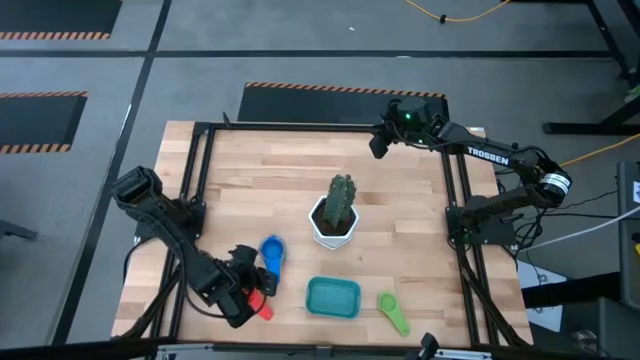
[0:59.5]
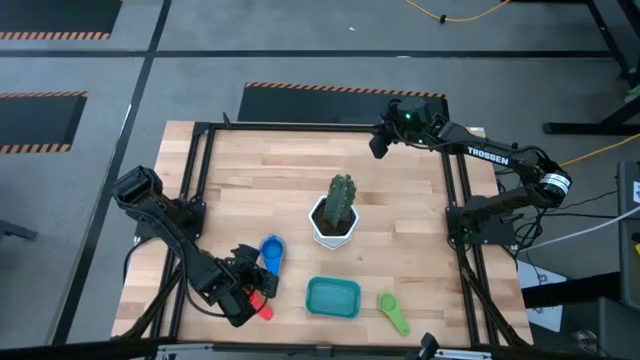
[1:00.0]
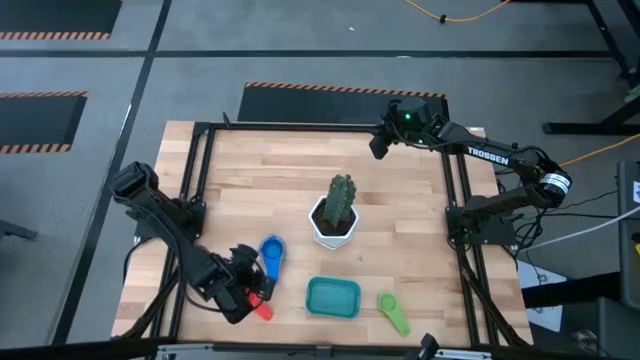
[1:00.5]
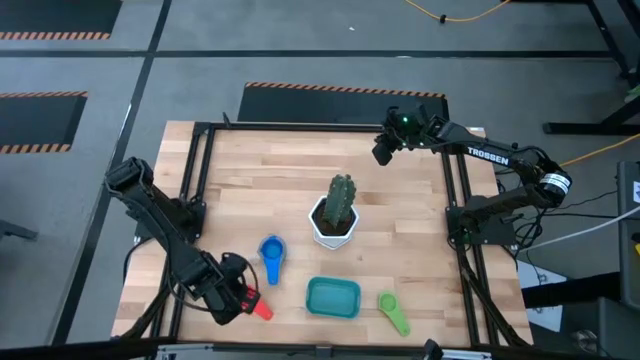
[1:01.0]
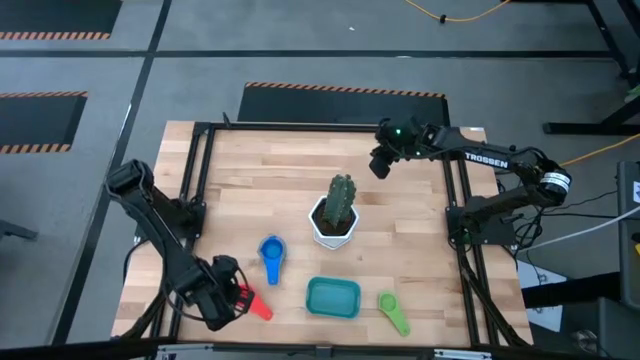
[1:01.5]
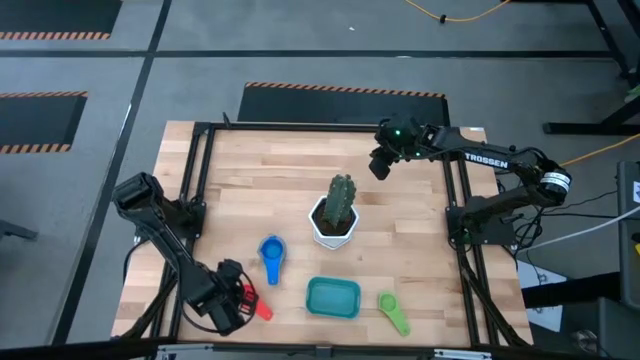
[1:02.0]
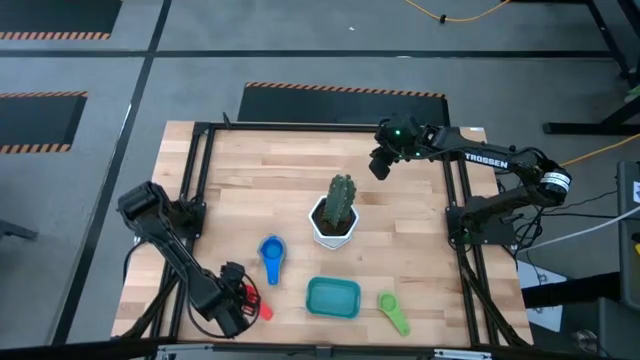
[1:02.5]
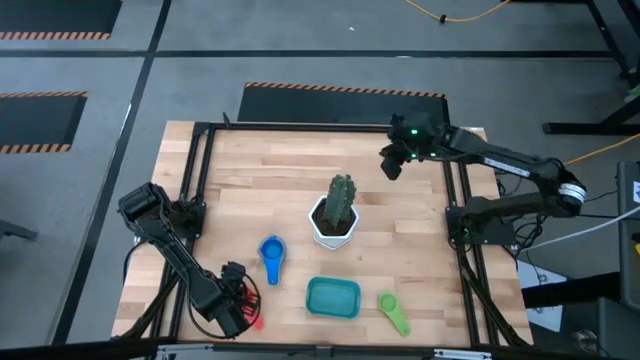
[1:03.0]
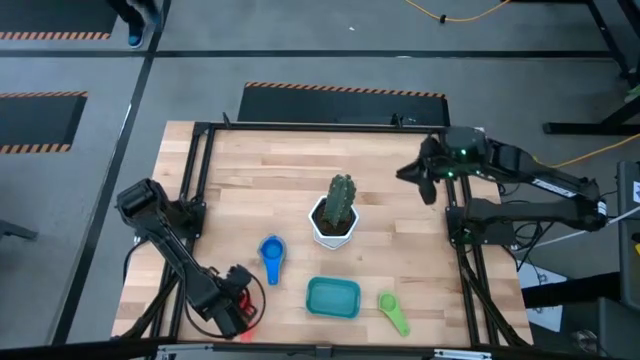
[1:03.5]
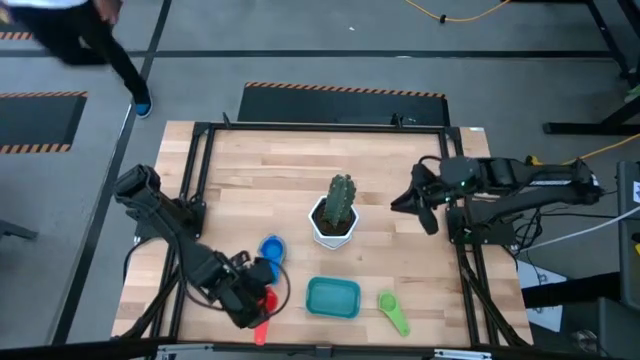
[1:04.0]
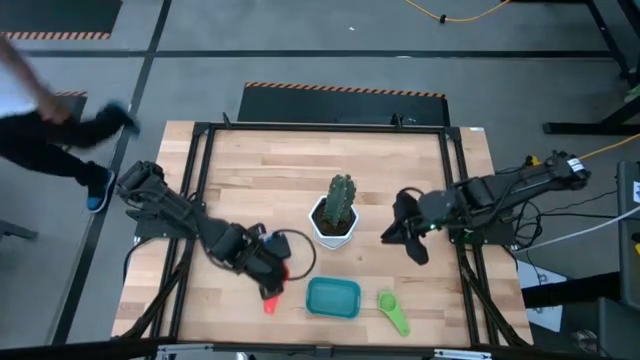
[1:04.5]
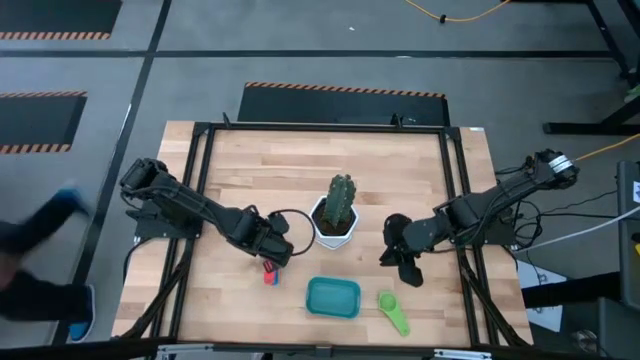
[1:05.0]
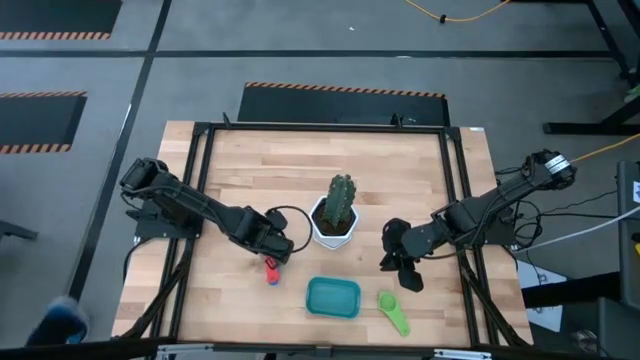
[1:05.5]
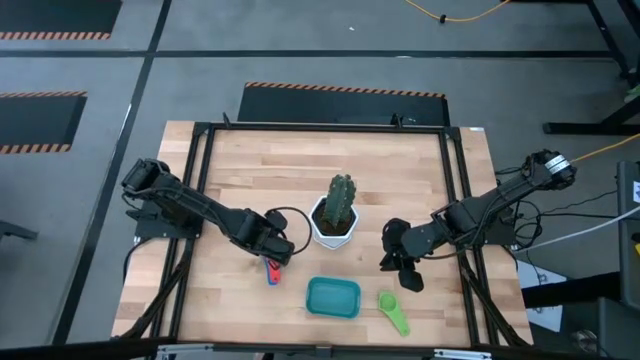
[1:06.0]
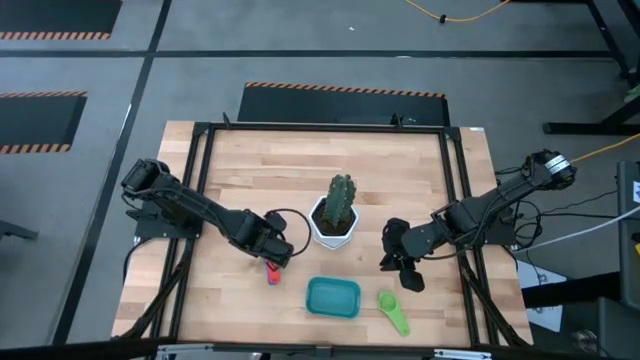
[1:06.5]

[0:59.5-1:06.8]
Task: Nest measuring cups in basket
Stack the red measuring cup on top of the blue measuring cup

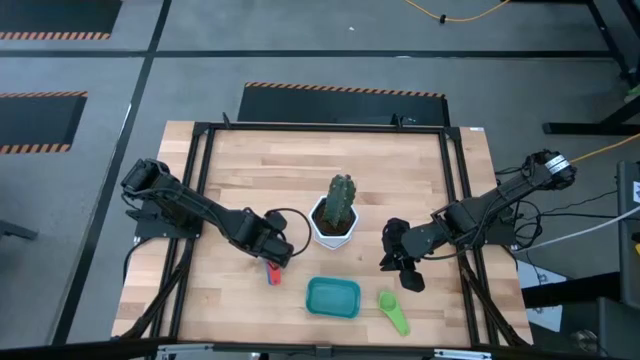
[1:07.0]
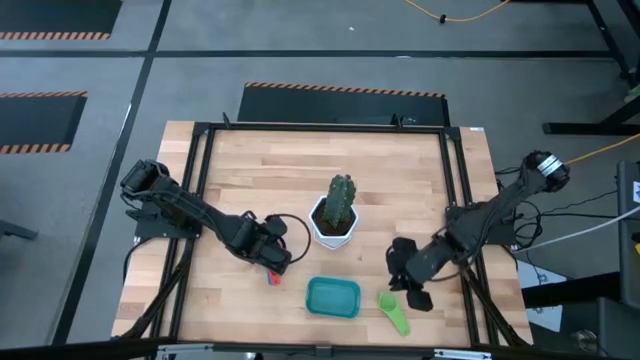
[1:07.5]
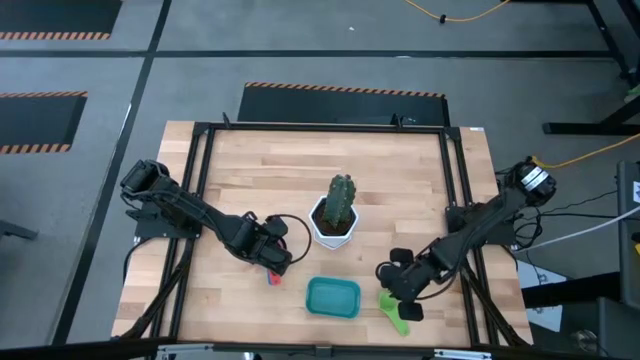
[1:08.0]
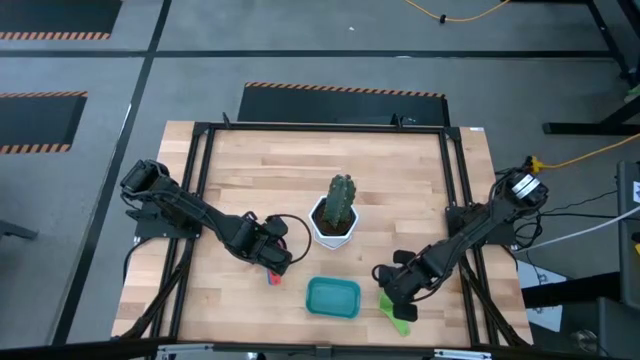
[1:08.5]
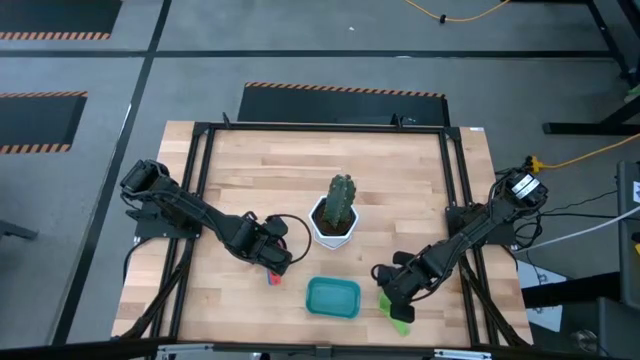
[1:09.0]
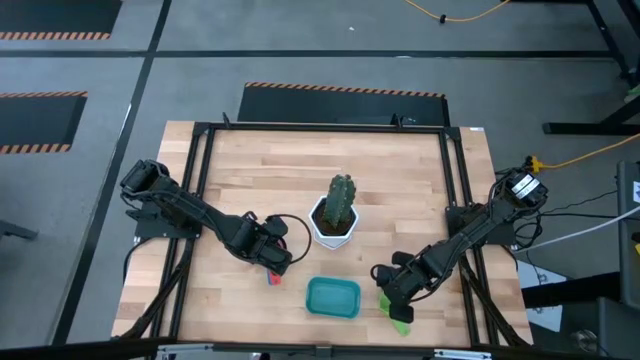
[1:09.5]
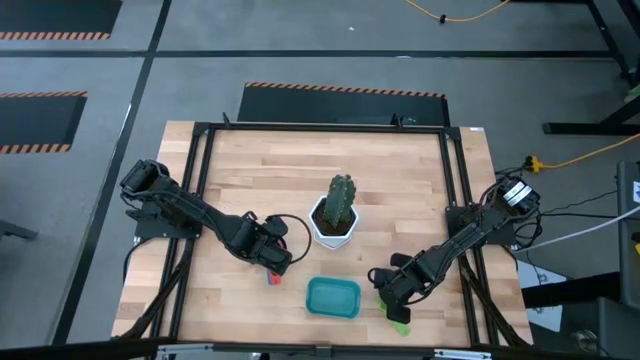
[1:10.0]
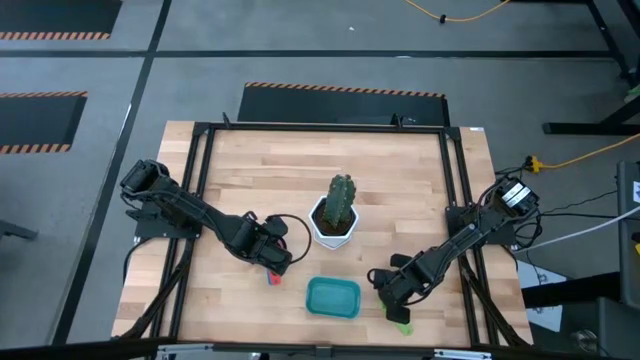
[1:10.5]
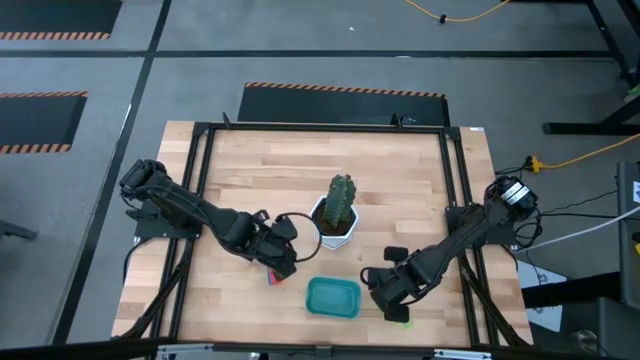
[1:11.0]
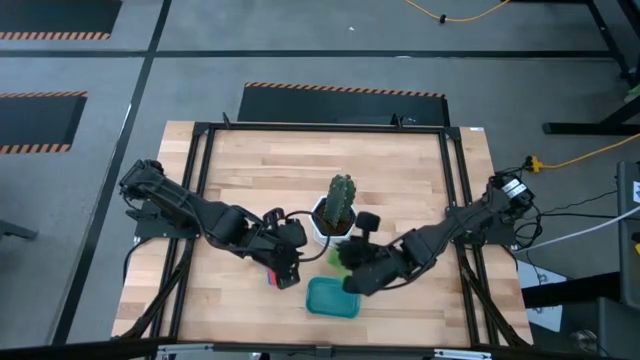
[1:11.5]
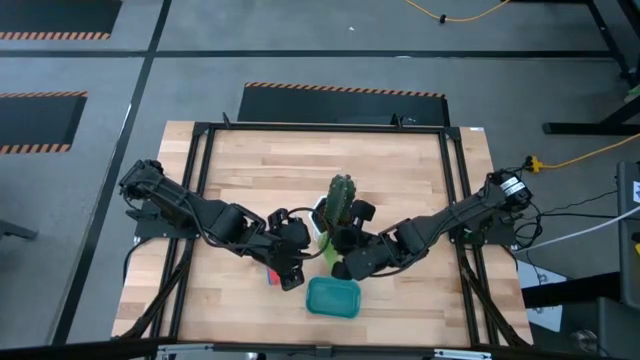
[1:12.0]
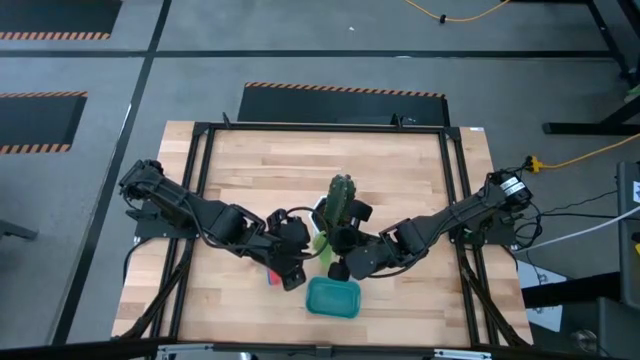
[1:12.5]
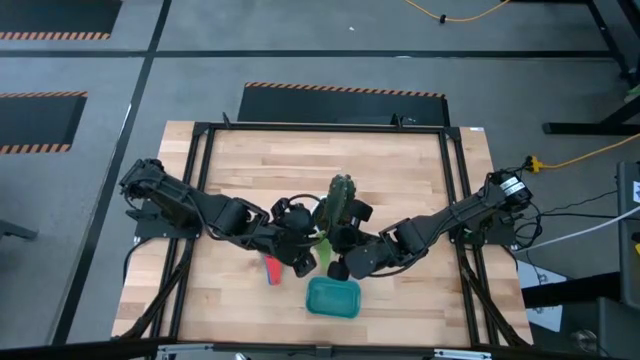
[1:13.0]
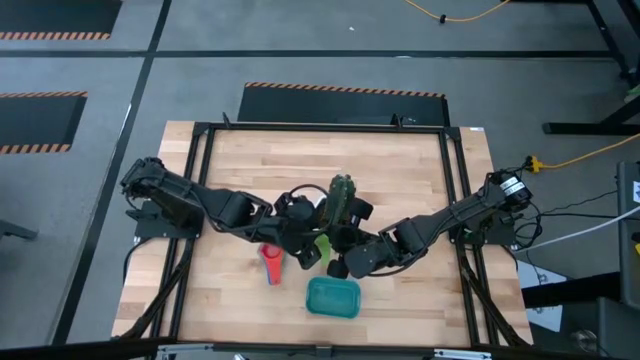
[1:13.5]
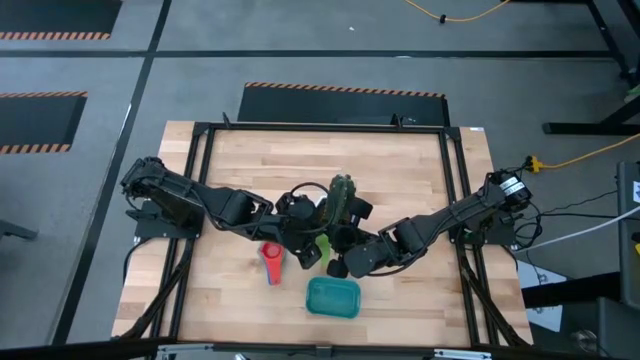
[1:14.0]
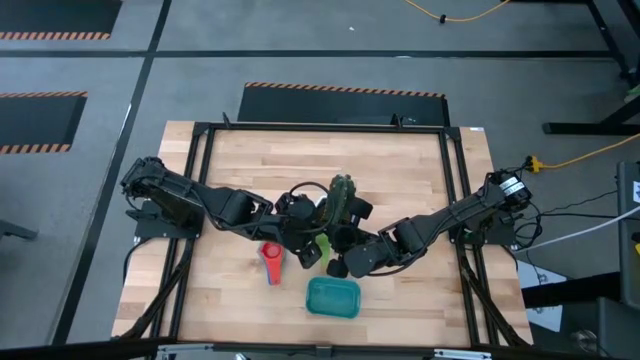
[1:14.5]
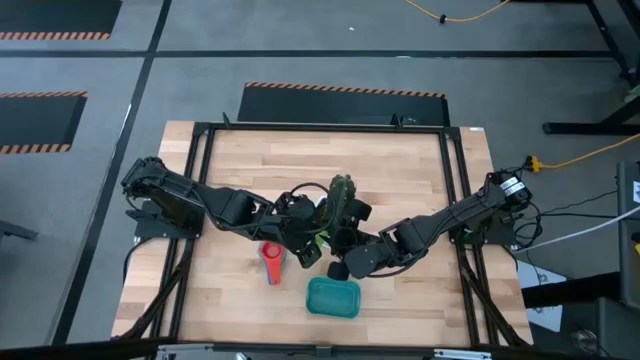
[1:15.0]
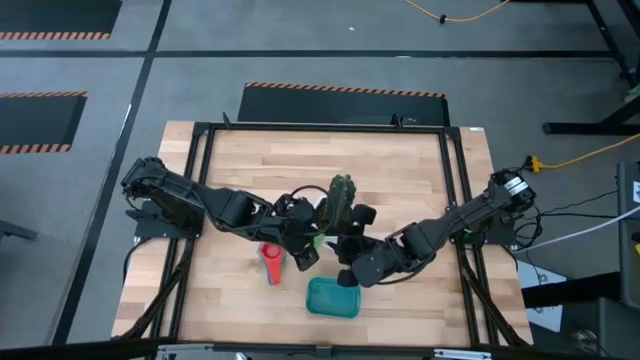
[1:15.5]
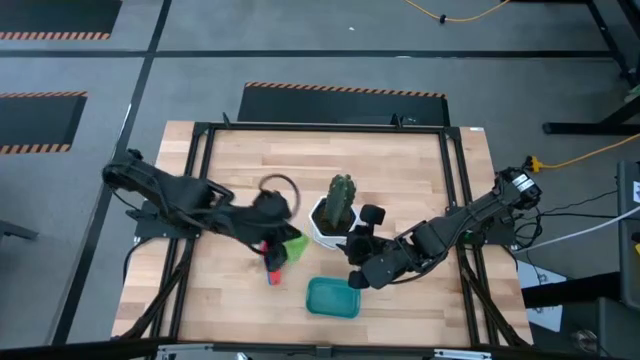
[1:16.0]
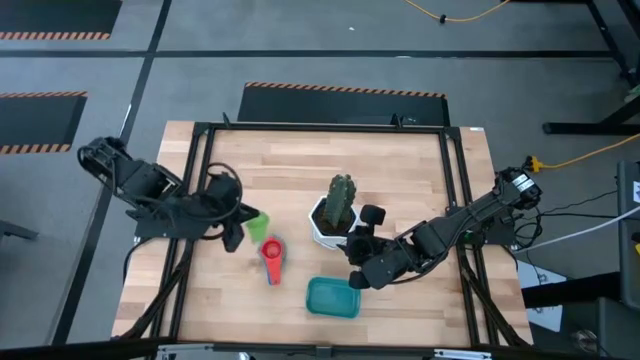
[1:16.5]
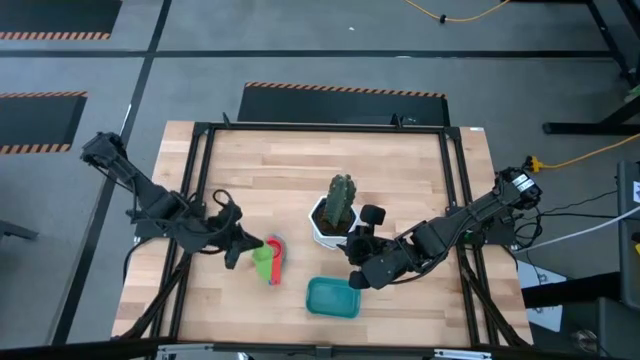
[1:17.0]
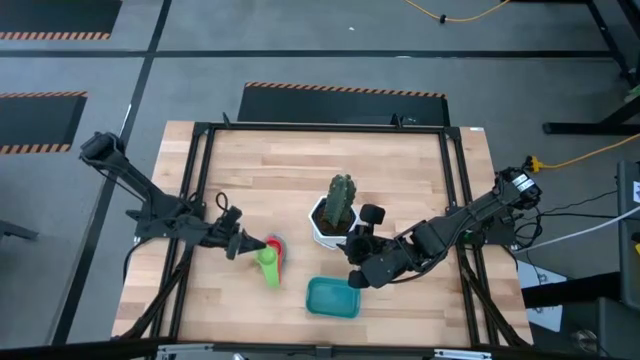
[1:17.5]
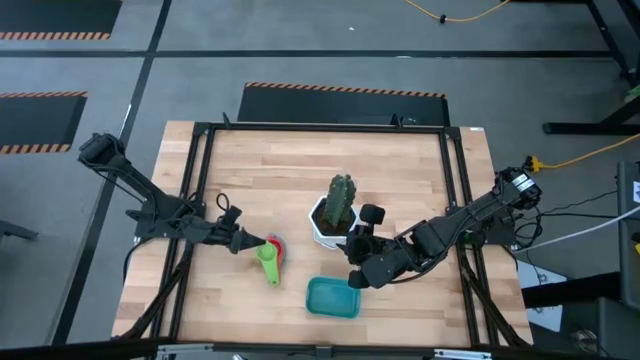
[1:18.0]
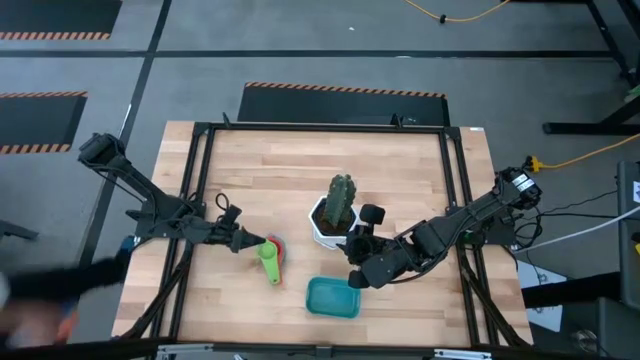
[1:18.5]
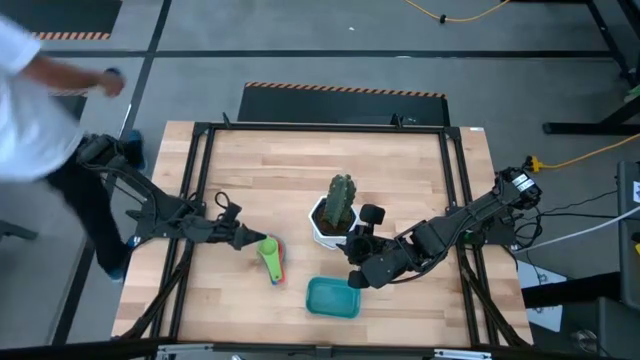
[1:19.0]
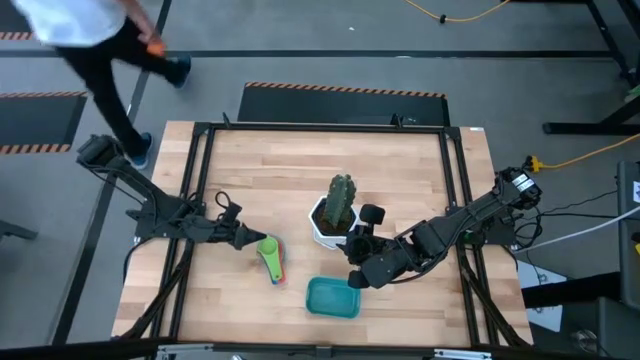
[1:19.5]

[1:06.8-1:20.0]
Stack the green measuring cup on top of the red measuring cup
